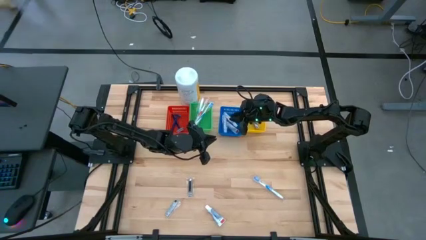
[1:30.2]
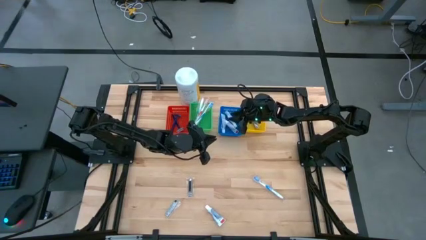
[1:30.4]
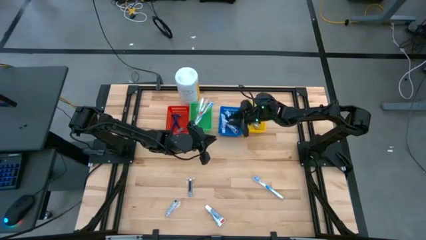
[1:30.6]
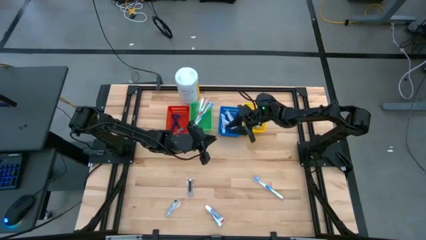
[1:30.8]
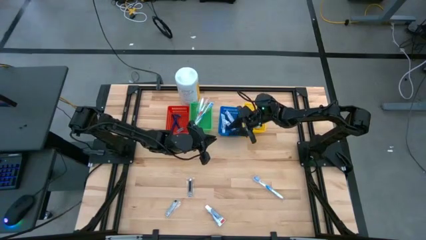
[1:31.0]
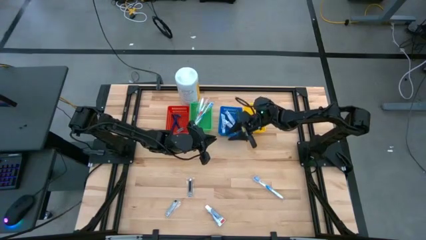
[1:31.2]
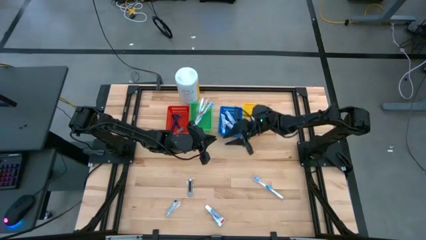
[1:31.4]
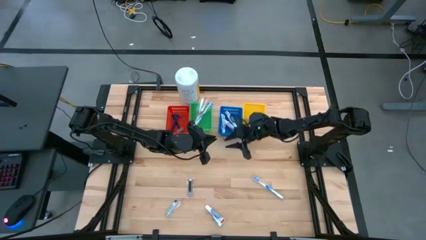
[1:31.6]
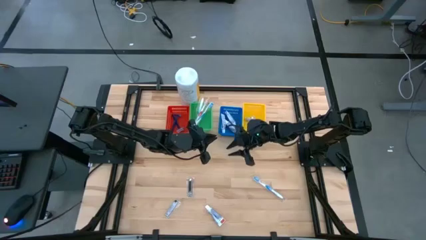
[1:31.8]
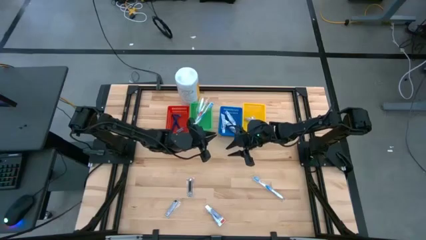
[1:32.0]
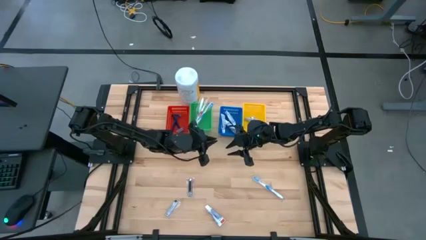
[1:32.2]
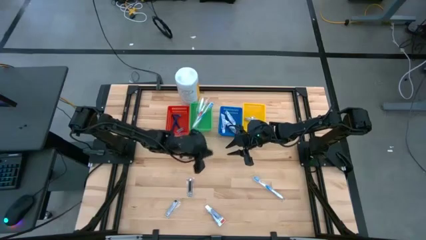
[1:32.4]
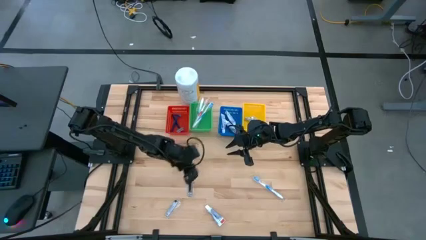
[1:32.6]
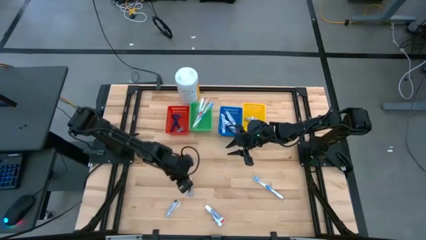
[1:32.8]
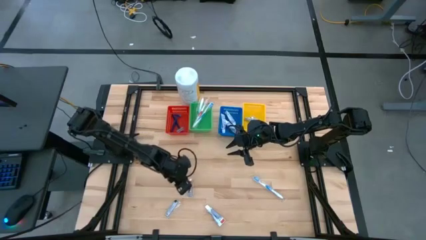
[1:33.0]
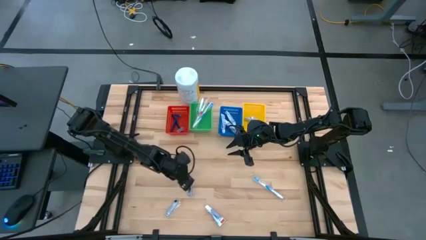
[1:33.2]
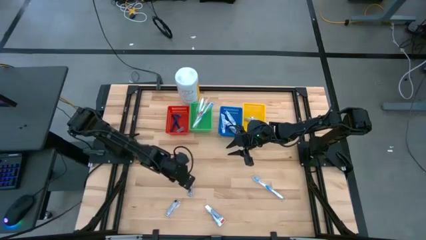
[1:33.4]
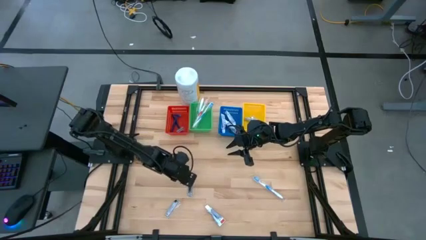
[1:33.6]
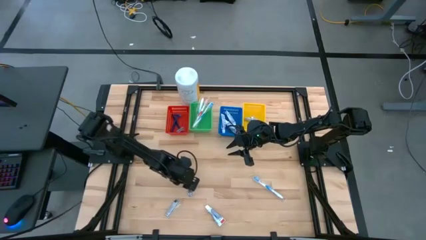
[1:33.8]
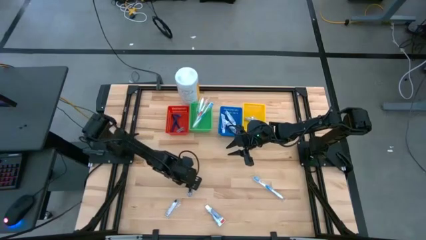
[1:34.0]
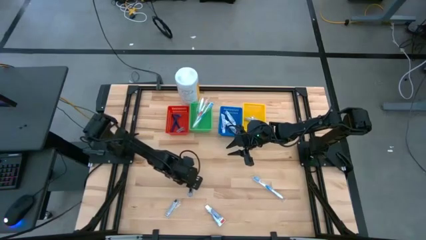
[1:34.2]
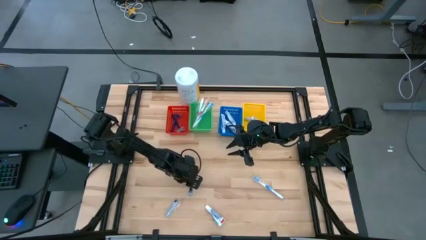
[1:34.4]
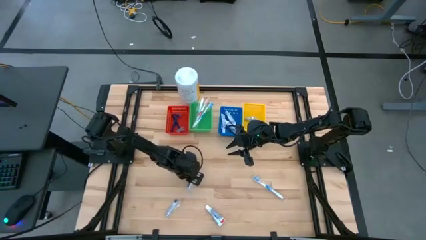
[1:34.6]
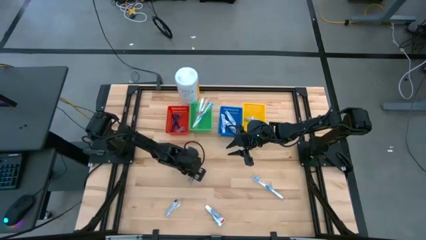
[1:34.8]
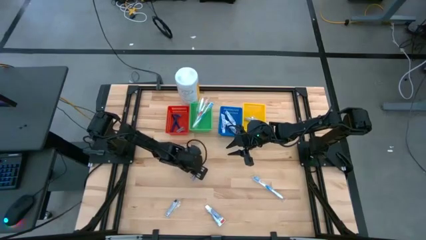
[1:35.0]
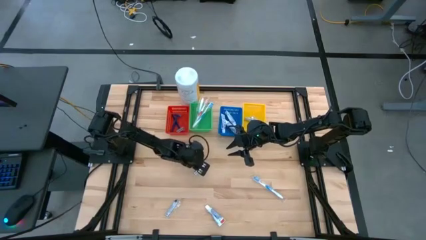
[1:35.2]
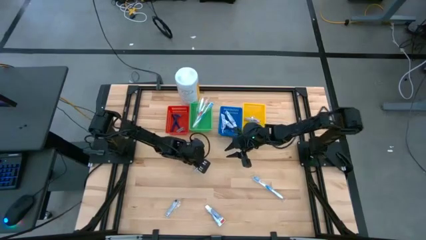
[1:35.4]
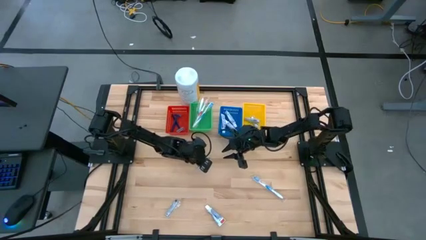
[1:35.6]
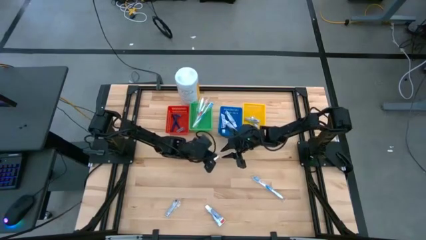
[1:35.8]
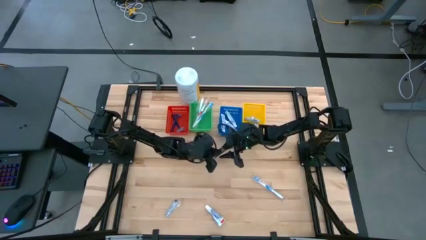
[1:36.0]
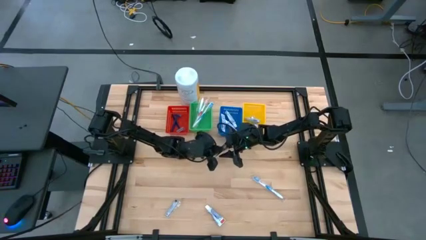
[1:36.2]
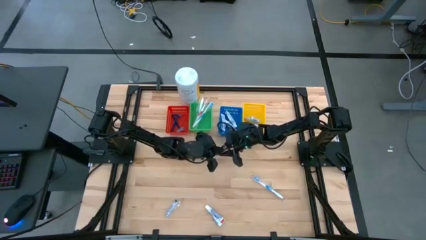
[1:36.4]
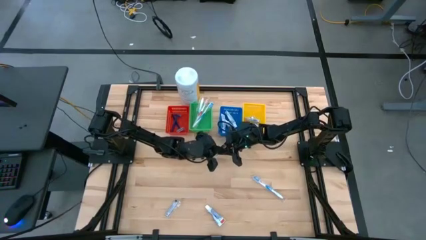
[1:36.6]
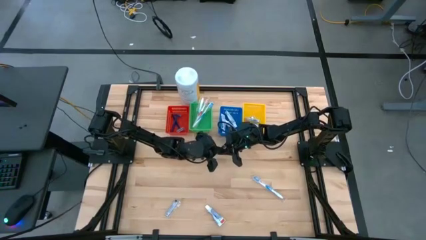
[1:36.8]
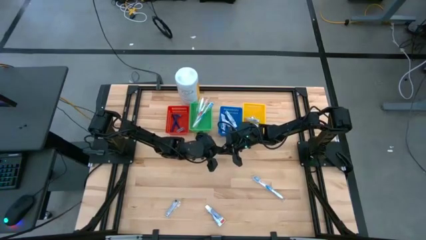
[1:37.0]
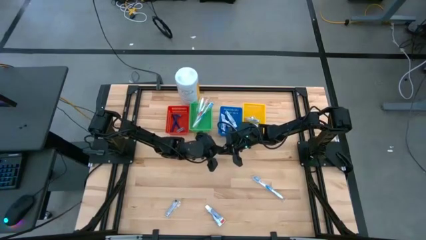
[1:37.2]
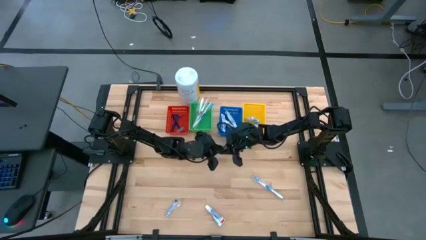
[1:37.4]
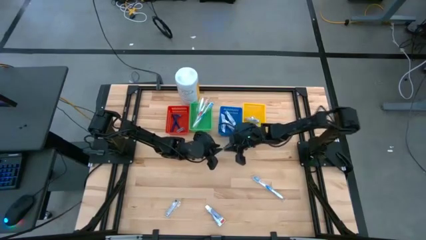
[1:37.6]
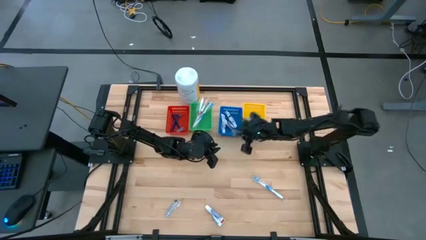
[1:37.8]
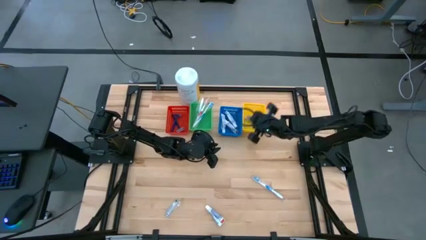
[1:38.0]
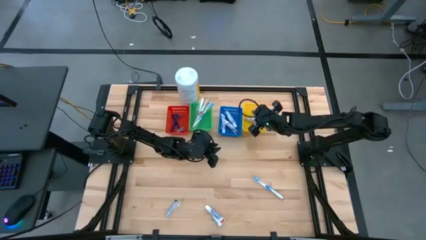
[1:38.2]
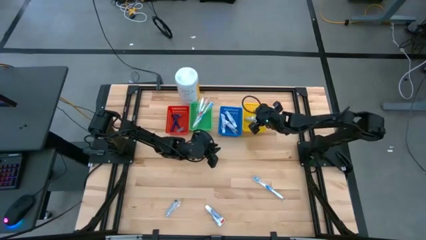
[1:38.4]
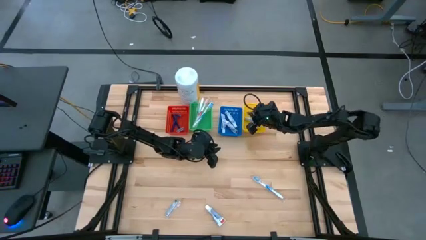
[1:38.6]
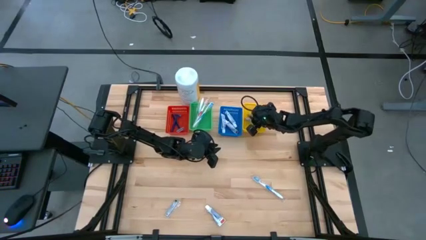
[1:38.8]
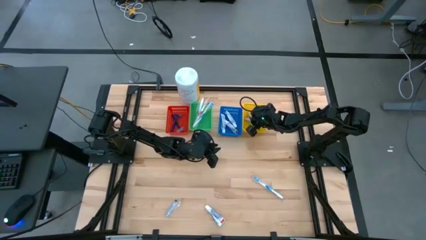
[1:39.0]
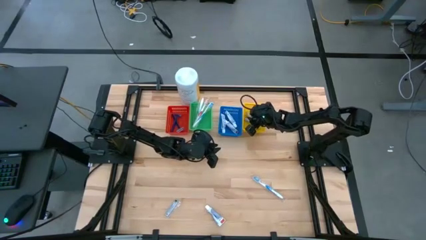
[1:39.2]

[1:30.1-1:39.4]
Task: Pick & Place Travel size toiletries
Put the silver nail cutter into the yellow bin

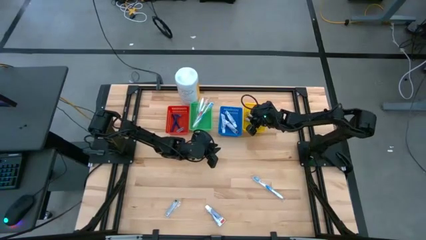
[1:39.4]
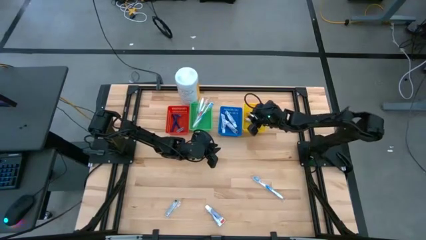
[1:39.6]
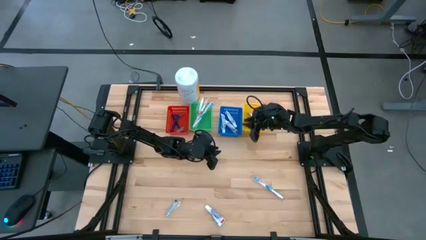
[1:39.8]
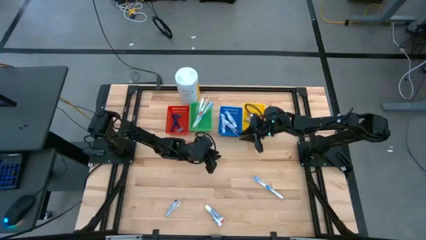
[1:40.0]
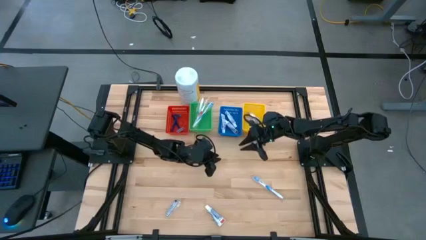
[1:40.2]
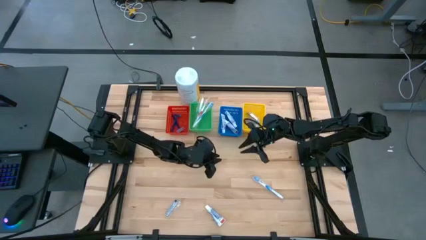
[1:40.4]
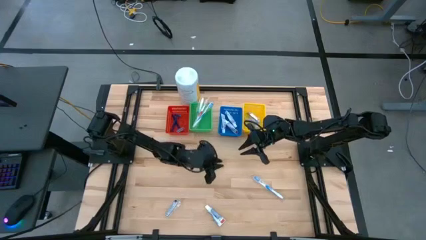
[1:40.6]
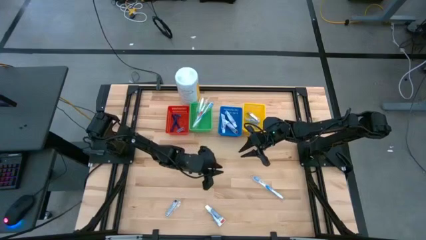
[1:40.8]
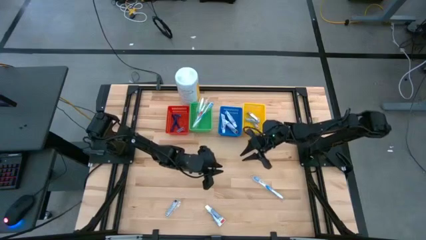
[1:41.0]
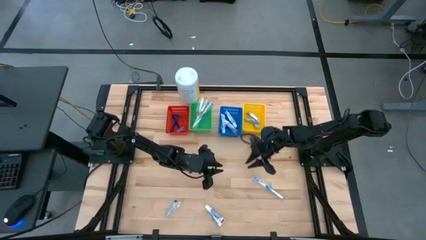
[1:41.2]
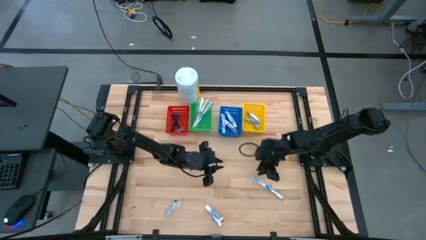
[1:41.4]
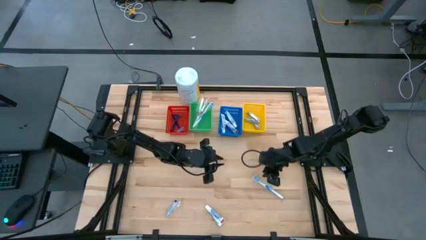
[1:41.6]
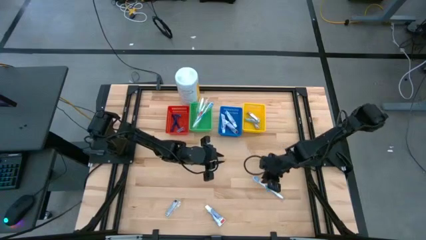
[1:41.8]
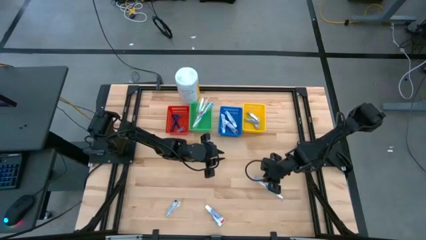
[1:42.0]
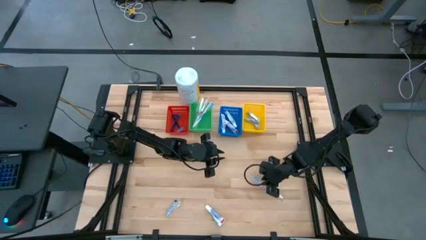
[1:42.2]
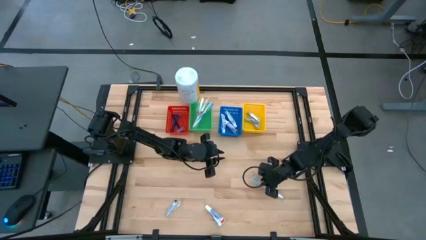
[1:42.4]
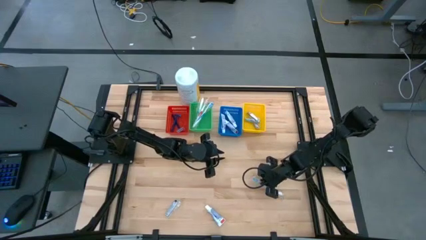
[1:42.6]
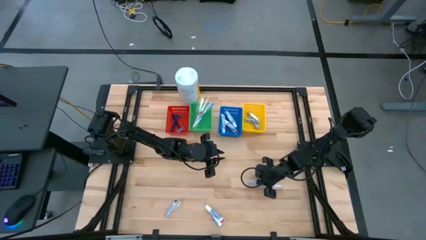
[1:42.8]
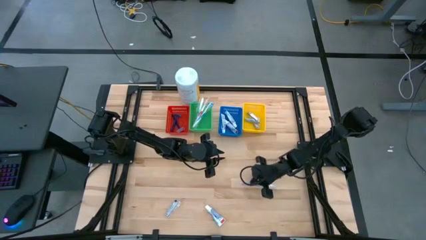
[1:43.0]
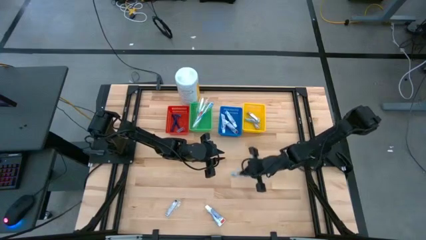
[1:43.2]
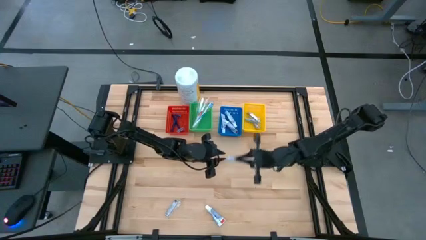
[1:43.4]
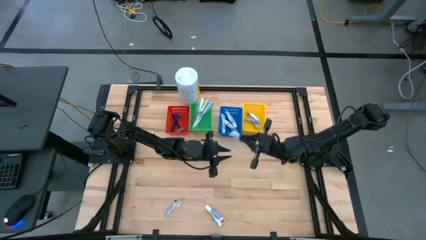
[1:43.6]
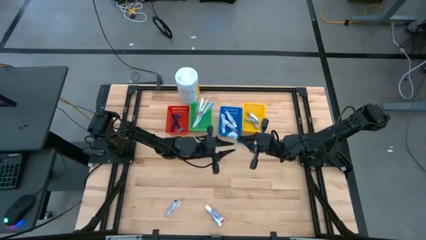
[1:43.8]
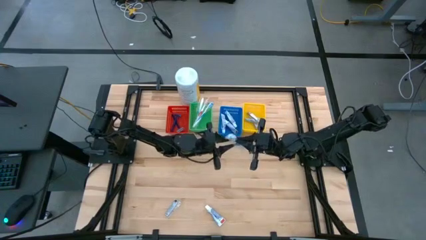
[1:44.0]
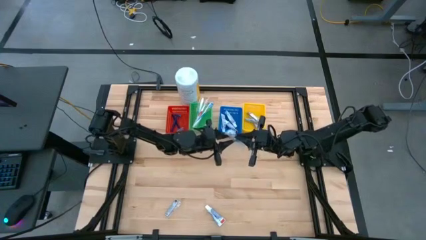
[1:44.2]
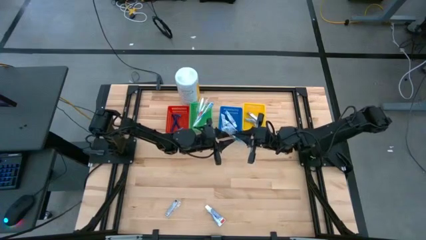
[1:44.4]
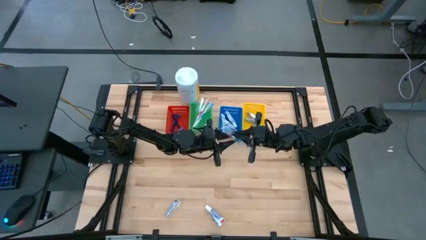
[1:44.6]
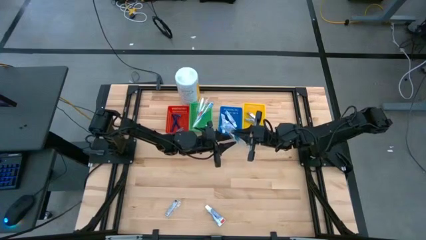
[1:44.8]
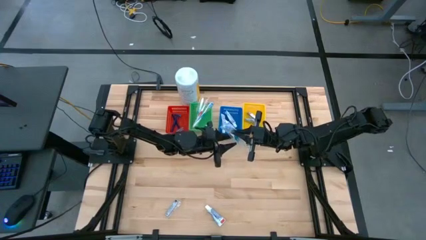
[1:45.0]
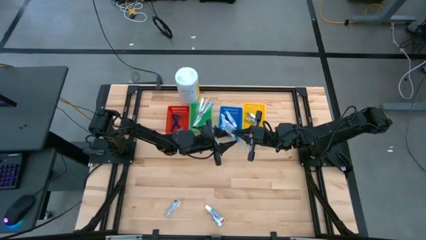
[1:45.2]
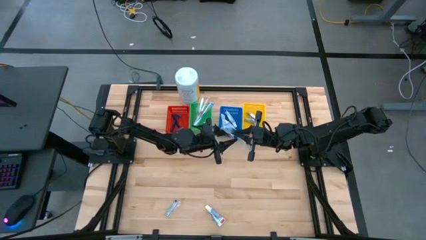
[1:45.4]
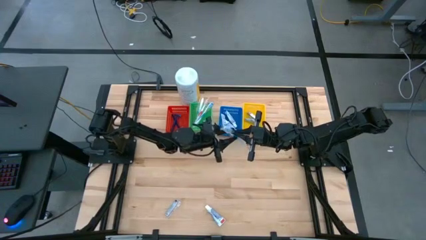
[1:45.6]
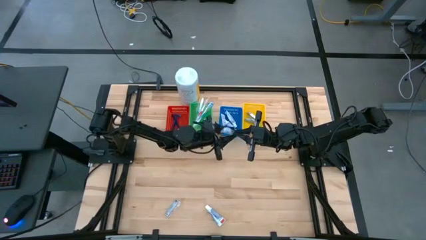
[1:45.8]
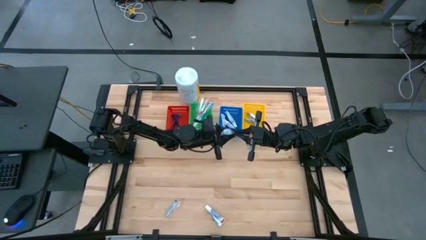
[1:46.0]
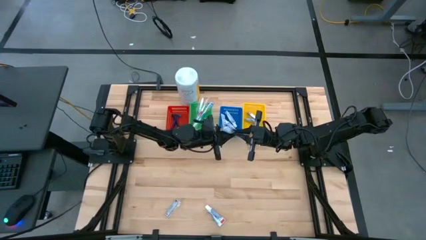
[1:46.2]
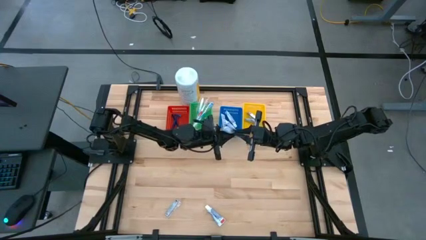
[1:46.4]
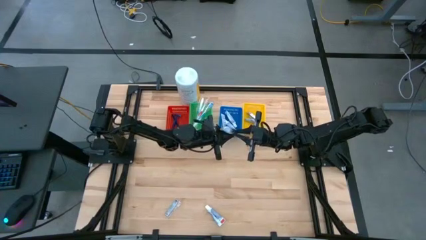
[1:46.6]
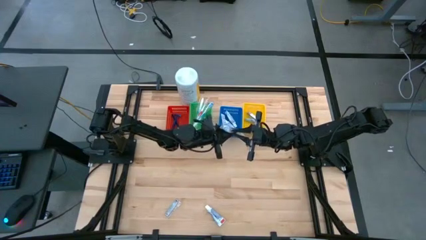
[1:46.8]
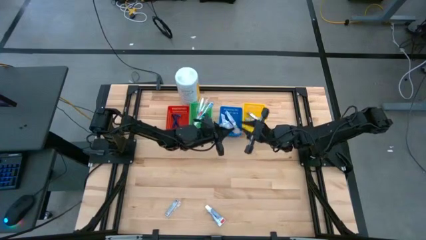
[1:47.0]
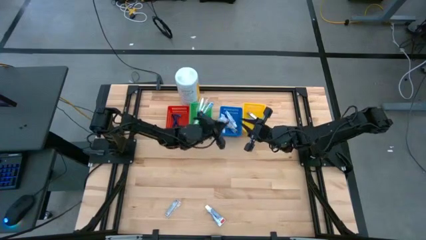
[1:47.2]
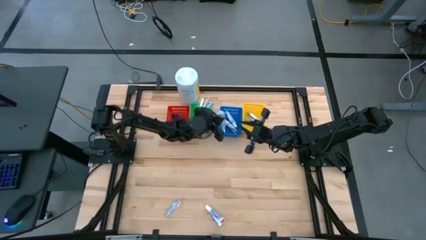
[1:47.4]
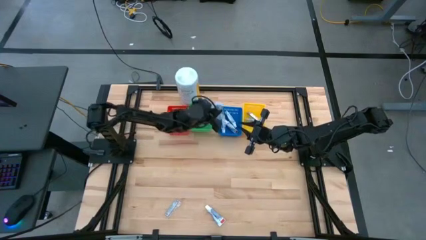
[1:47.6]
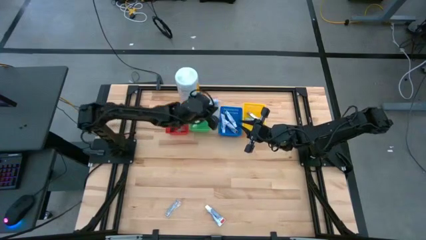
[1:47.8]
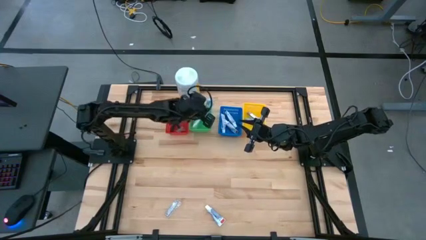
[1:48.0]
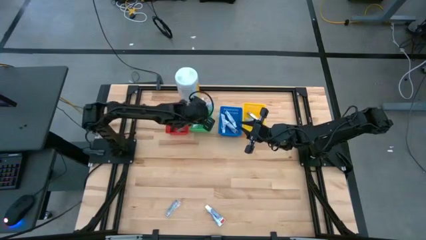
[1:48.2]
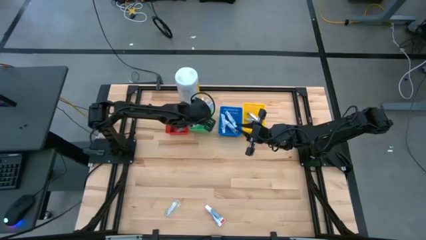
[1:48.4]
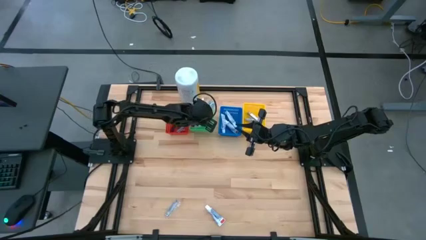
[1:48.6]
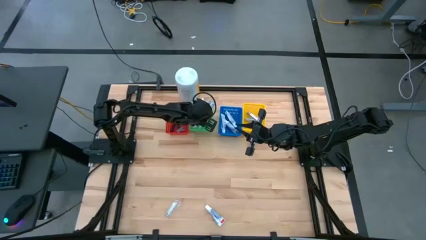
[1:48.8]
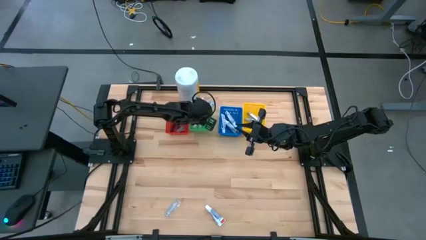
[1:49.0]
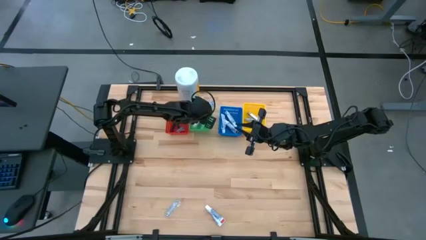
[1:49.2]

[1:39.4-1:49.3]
Put the blue toothbrush into the green bin
